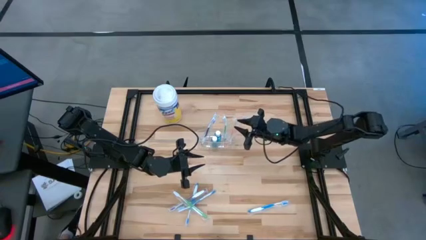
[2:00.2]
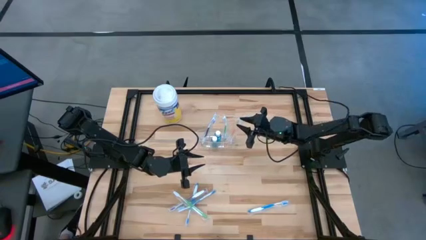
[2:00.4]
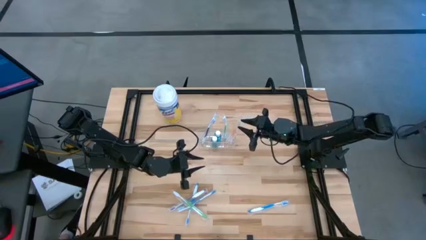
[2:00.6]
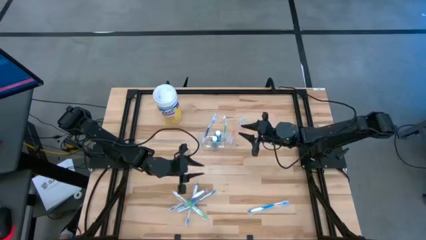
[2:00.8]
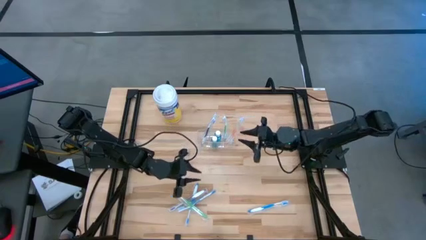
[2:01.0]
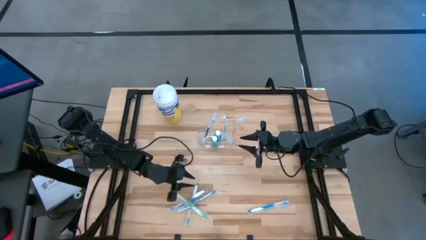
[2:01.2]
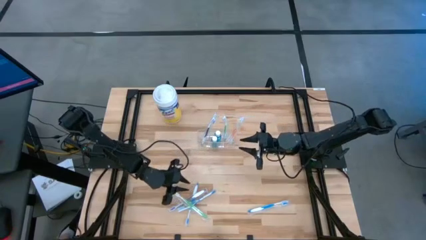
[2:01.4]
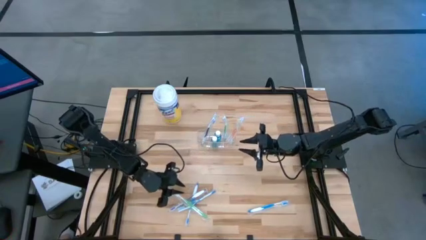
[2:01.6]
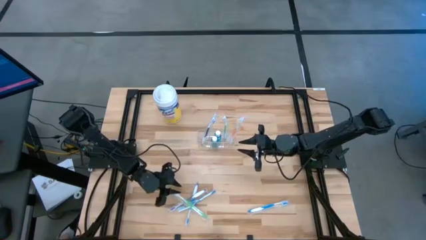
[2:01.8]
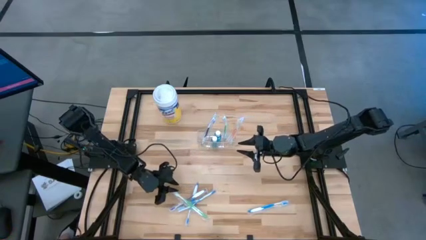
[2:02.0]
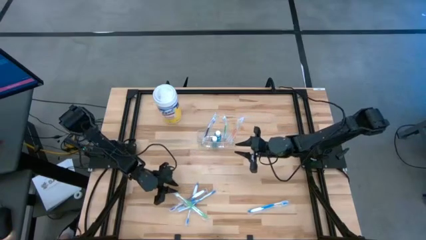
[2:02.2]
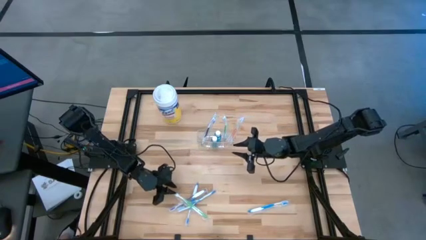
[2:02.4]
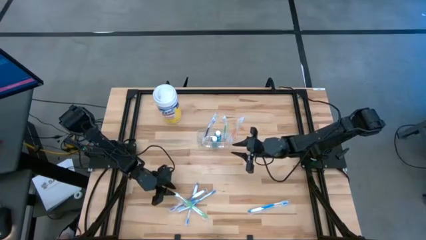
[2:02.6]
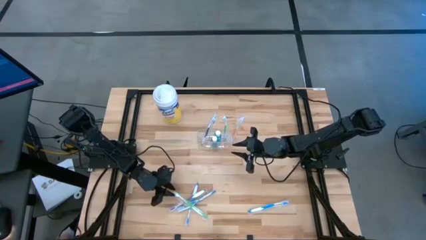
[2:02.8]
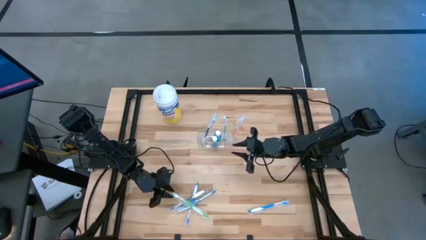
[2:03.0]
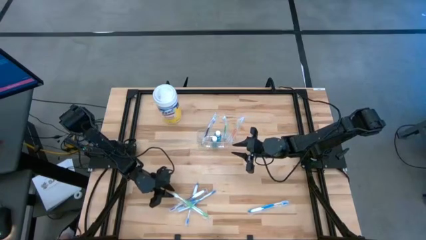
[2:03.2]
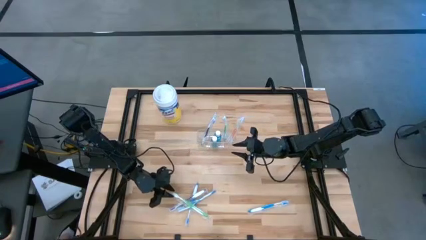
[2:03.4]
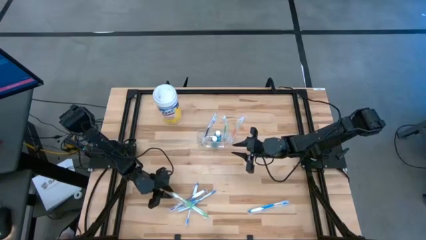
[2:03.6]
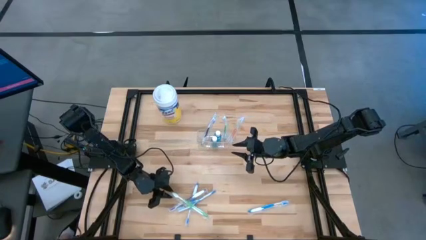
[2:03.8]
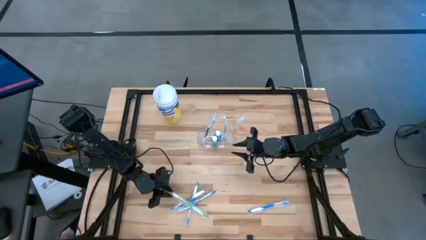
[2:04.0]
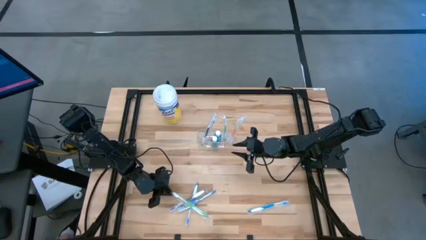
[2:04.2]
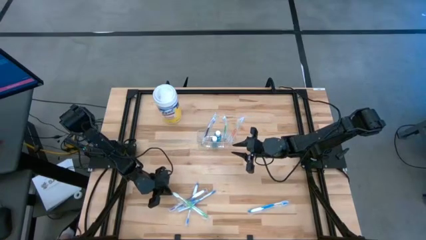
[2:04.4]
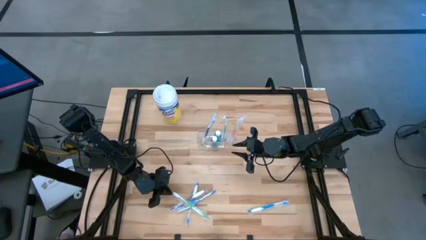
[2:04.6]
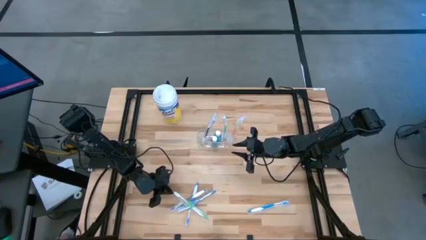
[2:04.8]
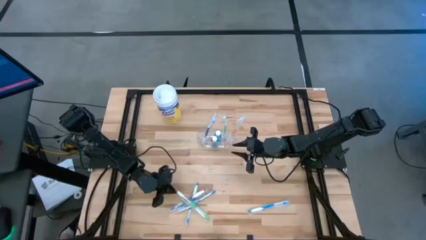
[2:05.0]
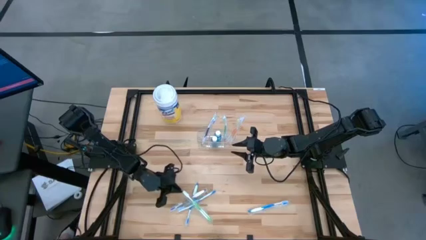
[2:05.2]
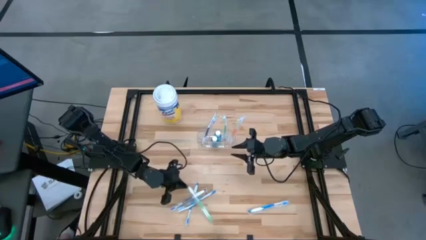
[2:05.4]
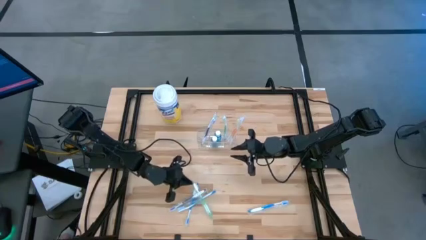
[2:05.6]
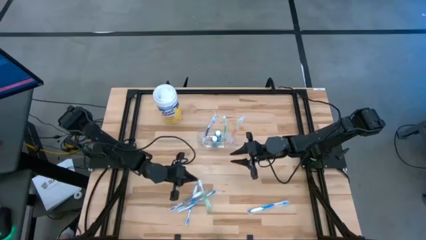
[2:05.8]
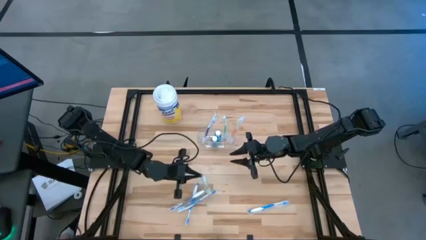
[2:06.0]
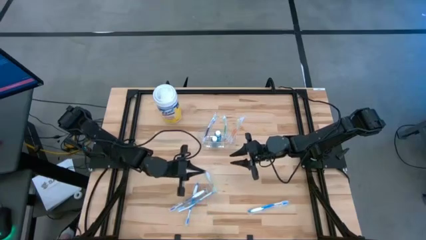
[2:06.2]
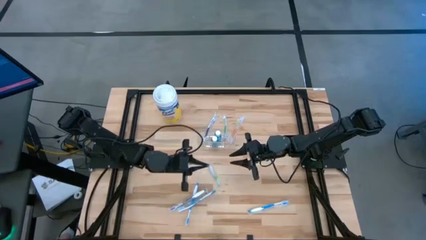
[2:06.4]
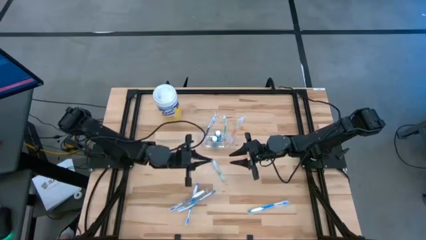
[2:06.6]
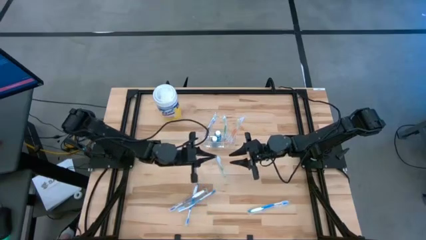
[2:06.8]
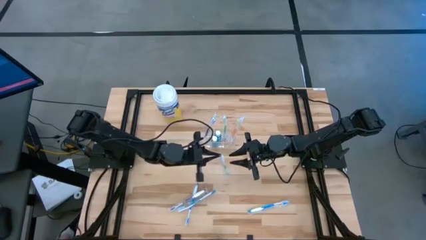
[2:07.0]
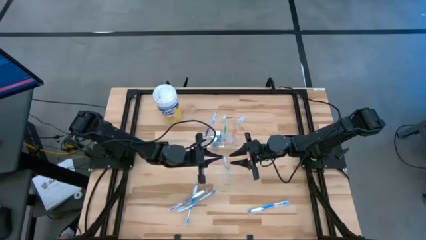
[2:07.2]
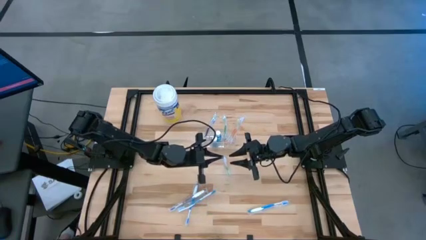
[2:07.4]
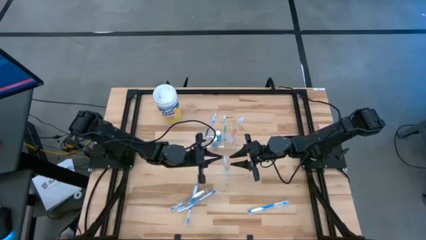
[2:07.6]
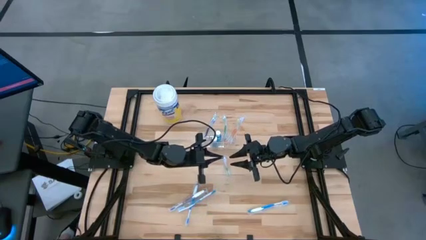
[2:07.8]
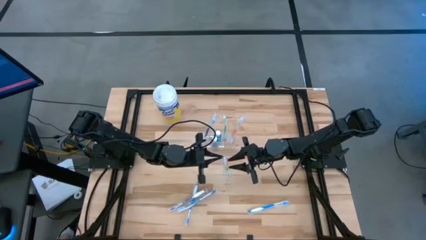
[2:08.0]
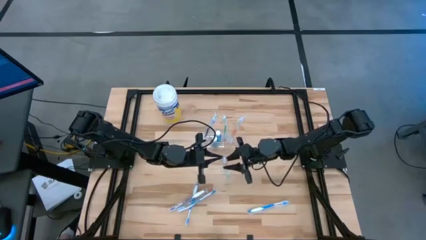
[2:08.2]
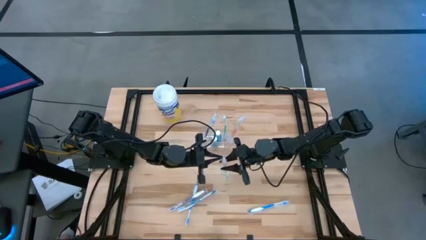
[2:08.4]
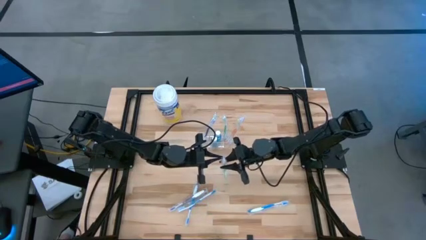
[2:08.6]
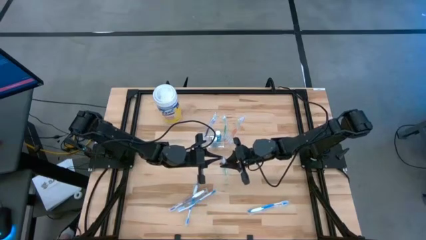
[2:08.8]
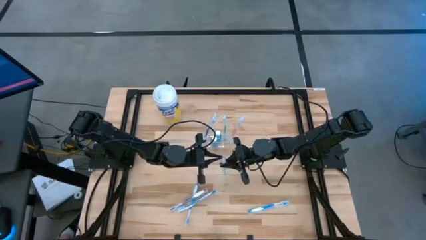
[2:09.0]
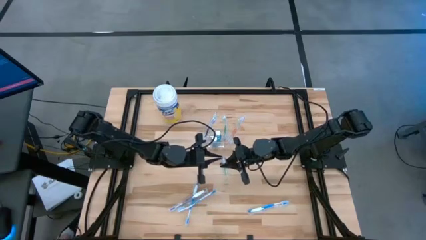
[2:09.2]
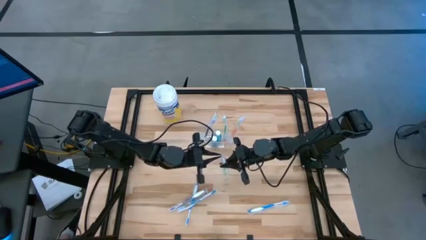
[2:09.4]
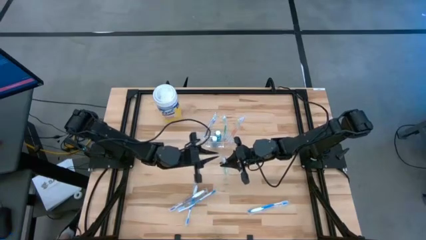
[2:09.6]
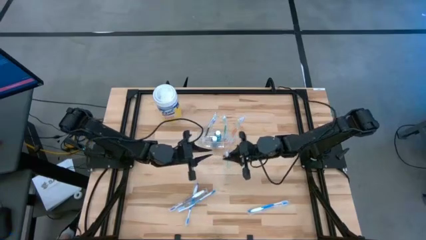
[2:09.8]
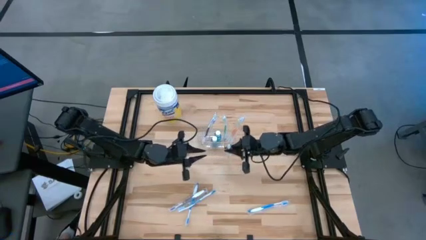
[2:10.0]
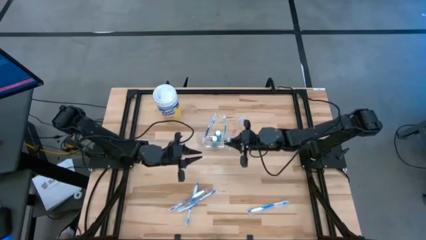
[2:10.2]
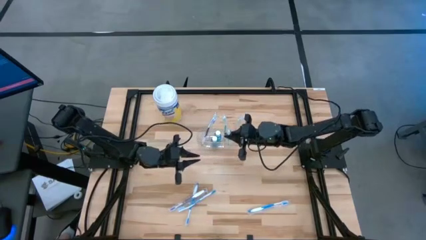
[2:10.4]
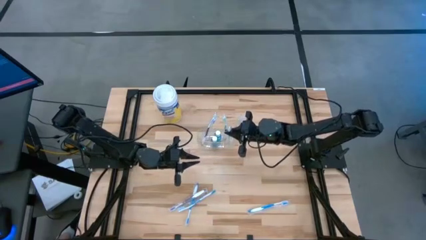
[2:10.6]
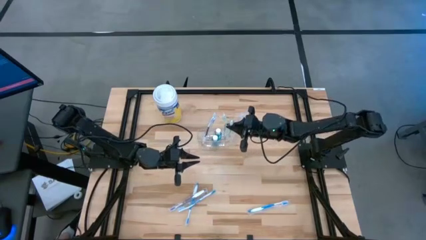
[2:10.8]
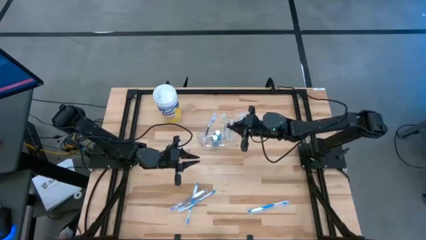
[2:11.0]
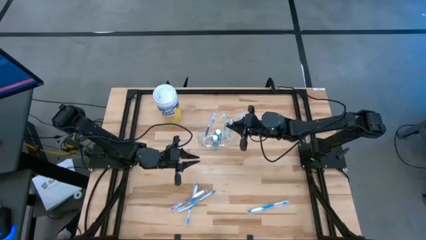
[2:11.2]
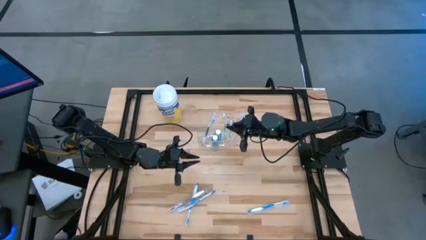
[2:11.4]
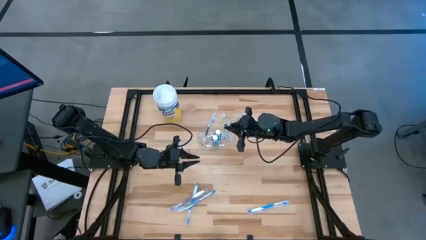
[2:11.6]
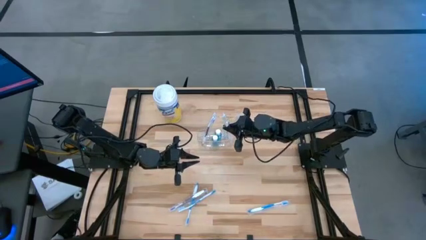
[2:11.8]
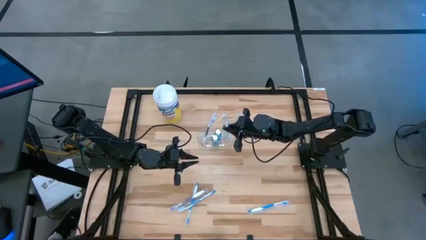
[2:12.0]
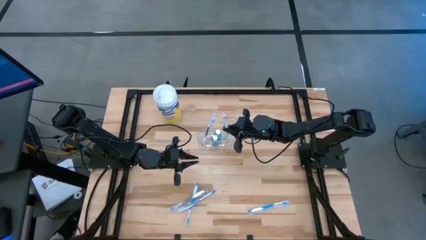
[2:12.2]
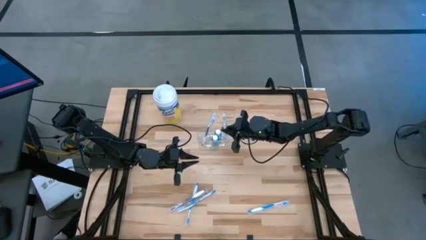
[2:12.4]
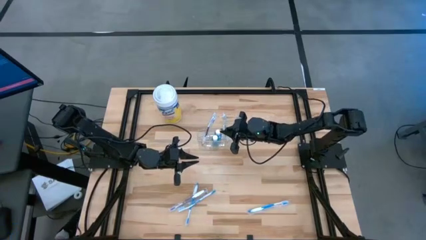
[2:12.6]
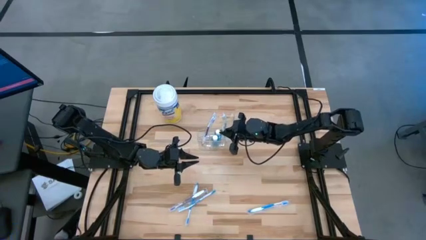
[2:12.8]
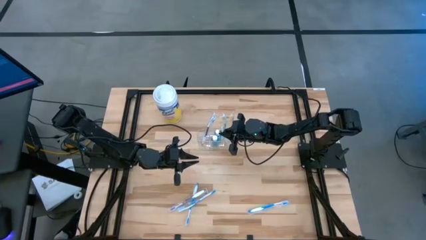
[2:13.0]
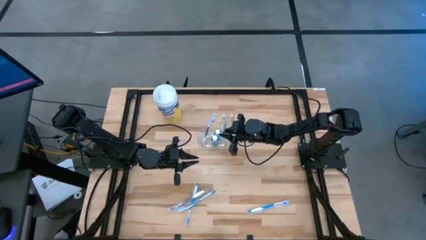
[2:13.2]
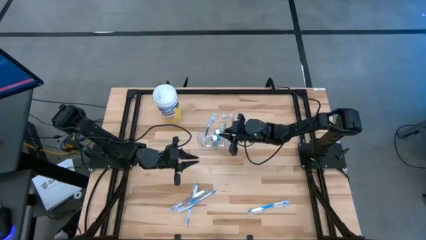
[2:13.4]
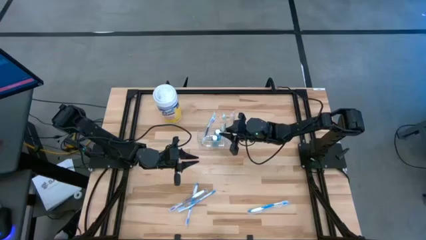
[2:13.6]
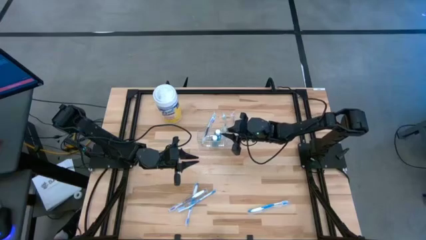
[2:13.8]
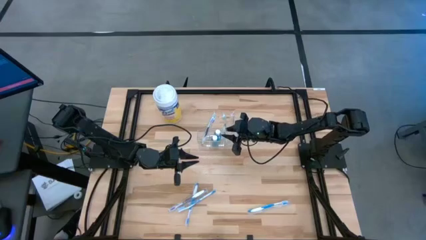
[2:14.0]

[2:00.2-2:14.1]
Task: Pick & Place toothbrushing station
Put the green toothbrush into the transparent organizer
